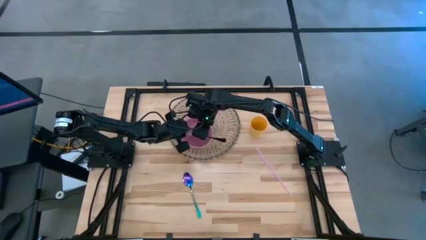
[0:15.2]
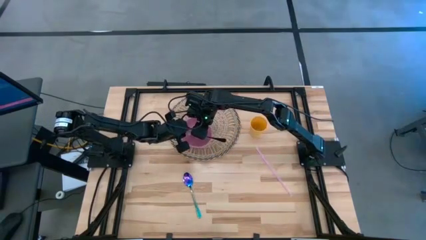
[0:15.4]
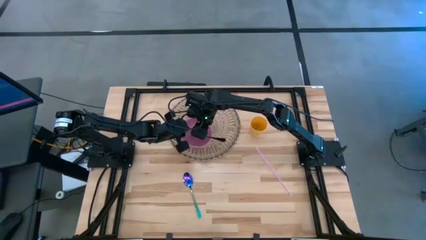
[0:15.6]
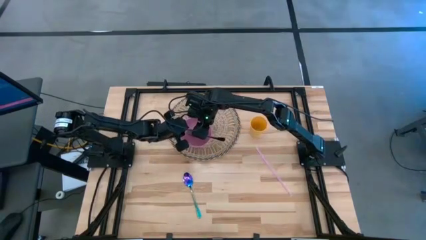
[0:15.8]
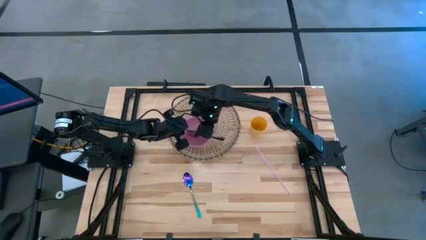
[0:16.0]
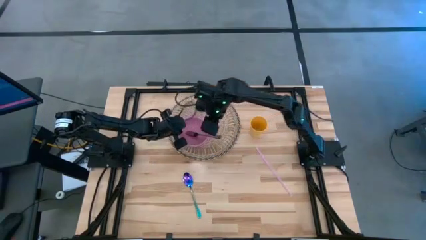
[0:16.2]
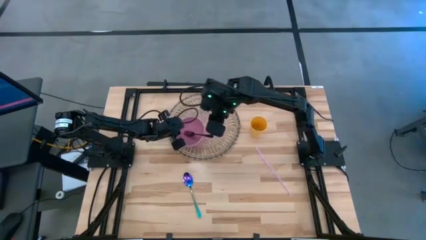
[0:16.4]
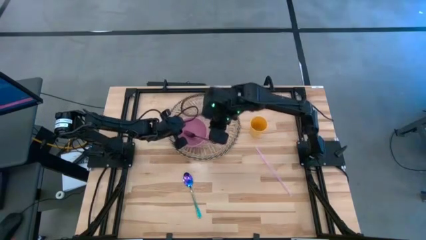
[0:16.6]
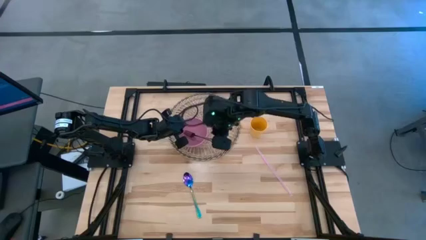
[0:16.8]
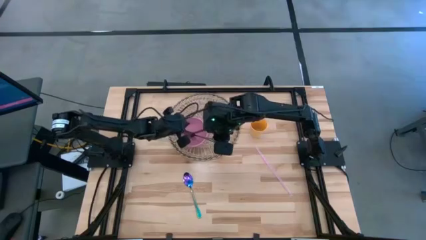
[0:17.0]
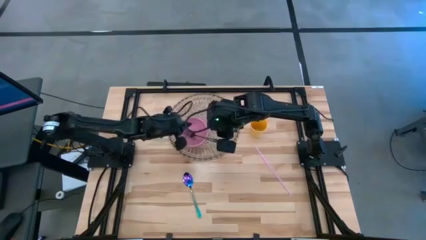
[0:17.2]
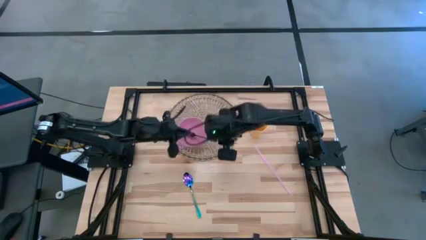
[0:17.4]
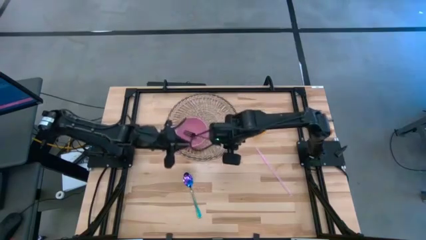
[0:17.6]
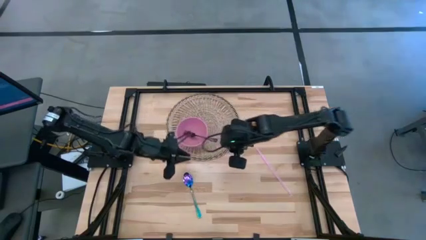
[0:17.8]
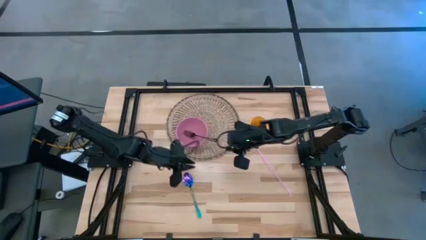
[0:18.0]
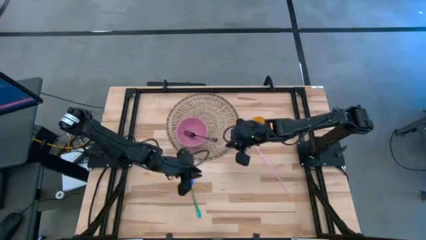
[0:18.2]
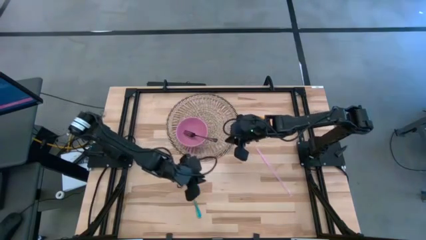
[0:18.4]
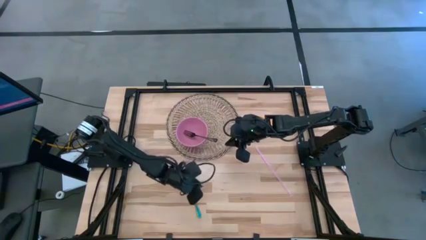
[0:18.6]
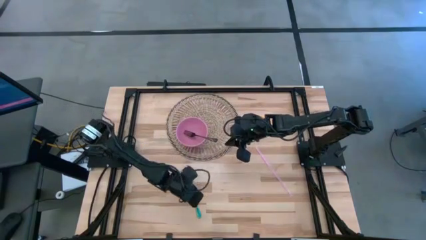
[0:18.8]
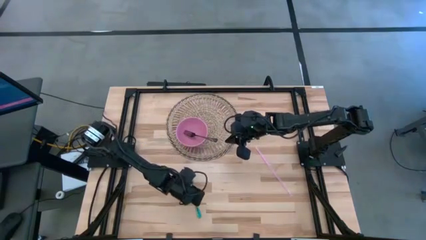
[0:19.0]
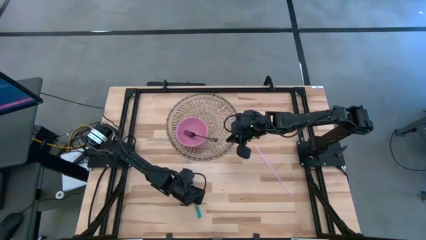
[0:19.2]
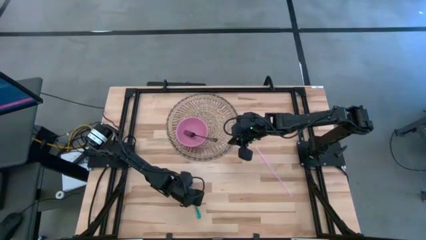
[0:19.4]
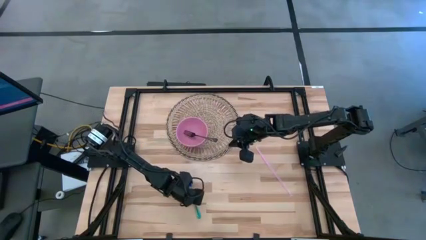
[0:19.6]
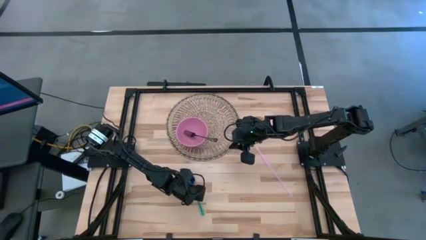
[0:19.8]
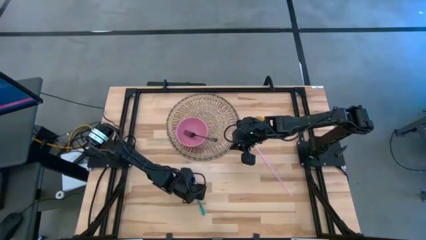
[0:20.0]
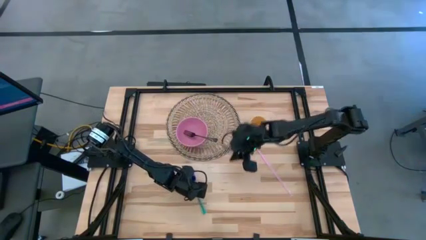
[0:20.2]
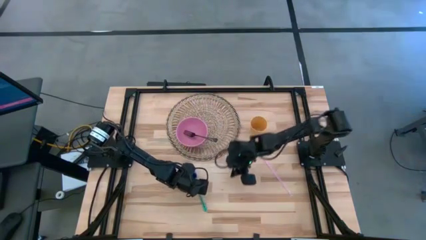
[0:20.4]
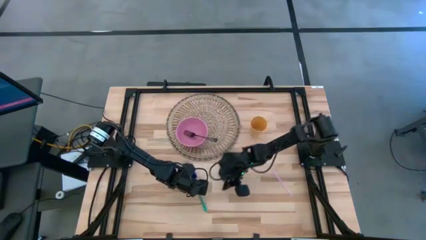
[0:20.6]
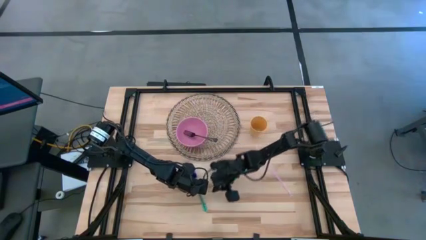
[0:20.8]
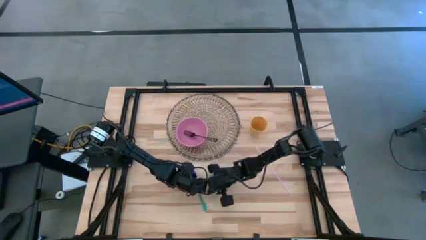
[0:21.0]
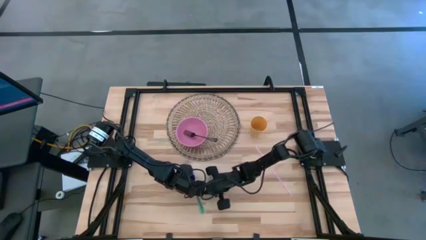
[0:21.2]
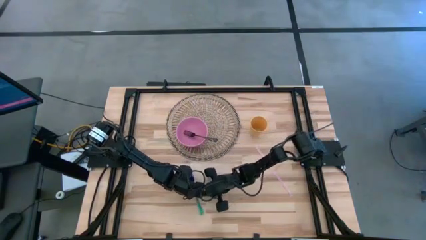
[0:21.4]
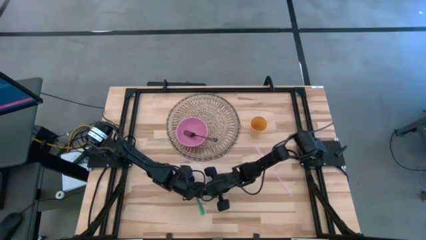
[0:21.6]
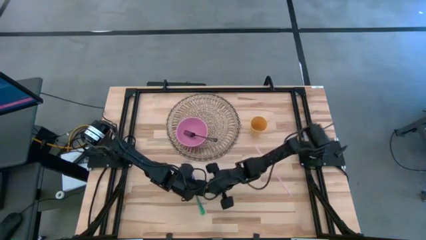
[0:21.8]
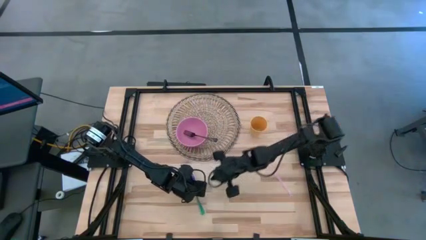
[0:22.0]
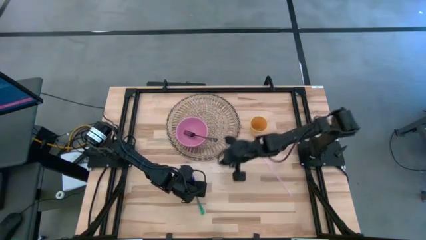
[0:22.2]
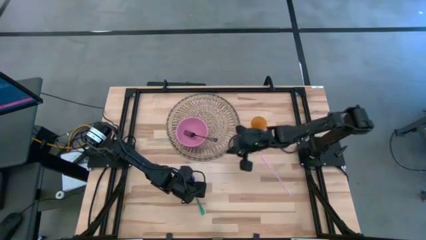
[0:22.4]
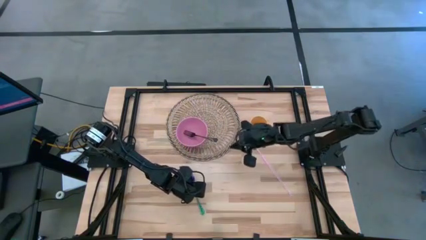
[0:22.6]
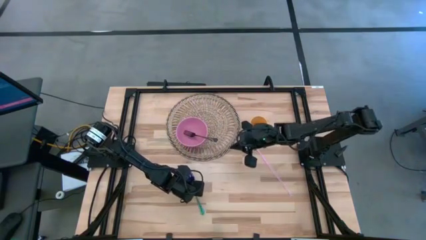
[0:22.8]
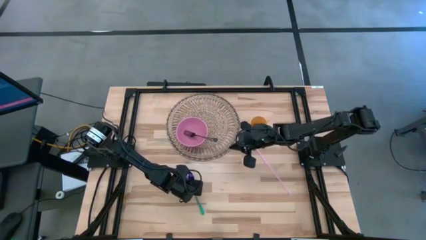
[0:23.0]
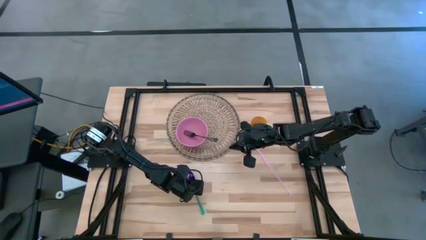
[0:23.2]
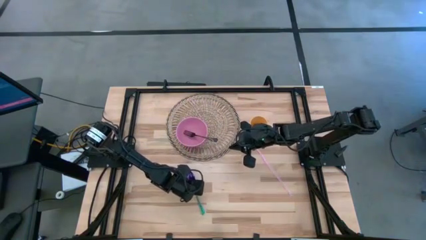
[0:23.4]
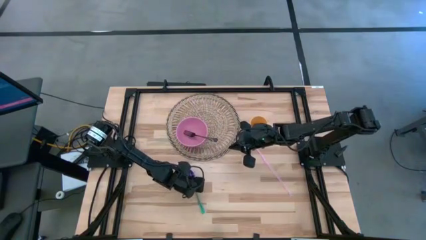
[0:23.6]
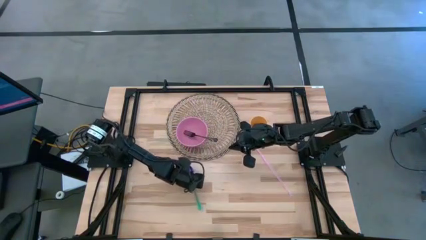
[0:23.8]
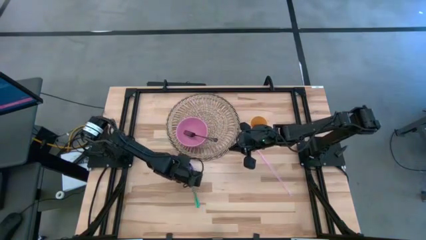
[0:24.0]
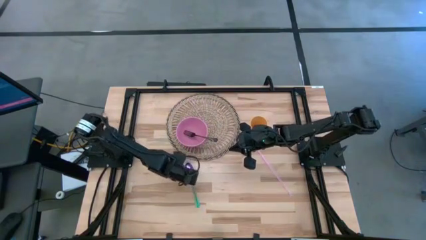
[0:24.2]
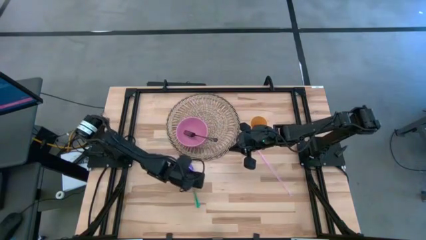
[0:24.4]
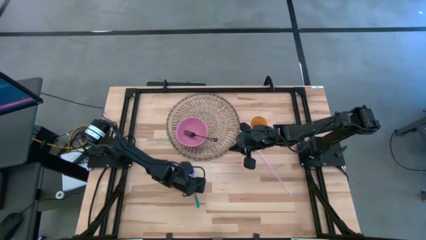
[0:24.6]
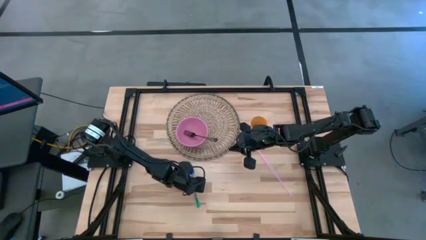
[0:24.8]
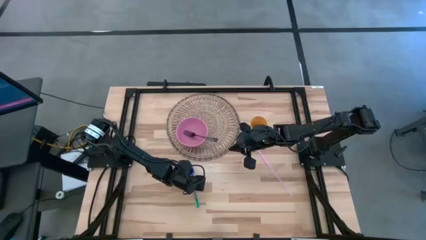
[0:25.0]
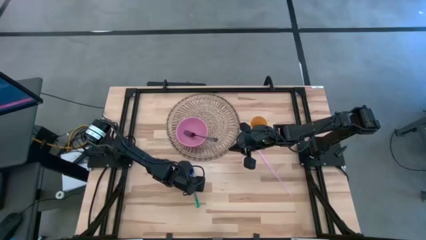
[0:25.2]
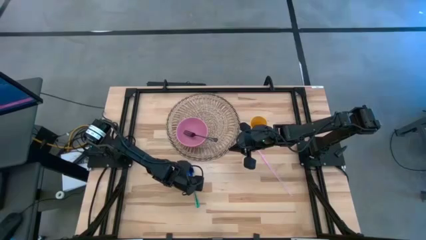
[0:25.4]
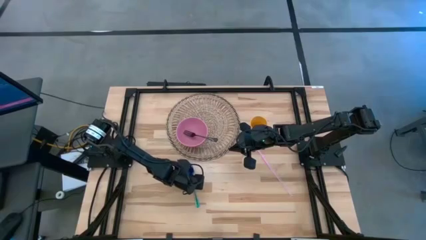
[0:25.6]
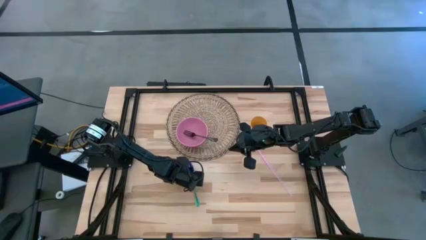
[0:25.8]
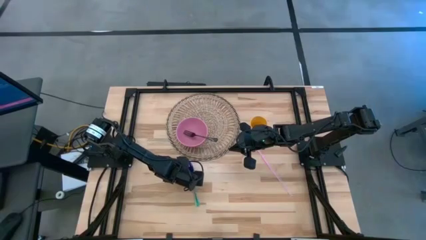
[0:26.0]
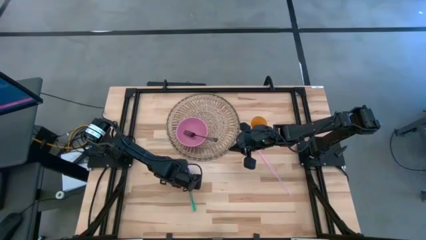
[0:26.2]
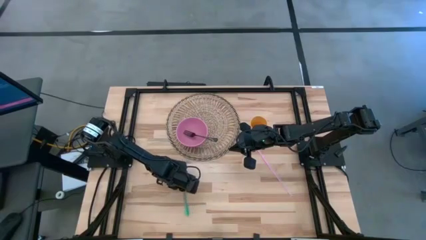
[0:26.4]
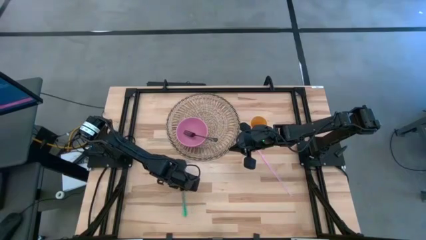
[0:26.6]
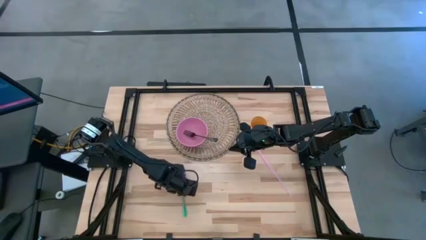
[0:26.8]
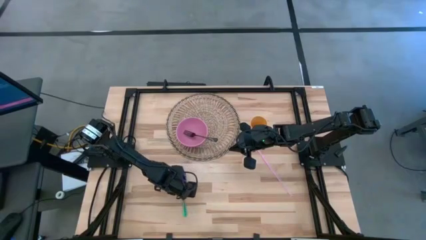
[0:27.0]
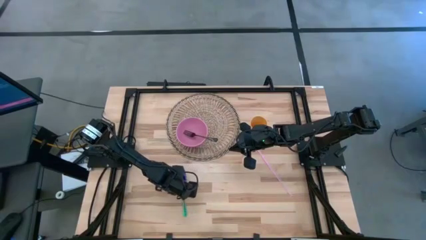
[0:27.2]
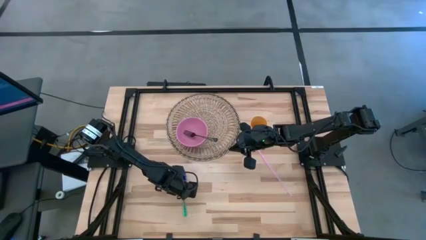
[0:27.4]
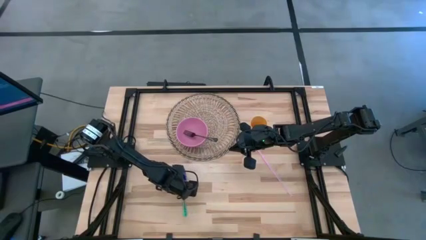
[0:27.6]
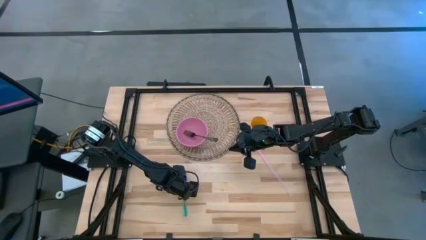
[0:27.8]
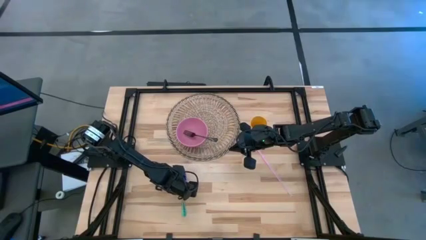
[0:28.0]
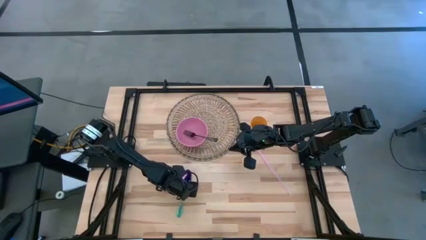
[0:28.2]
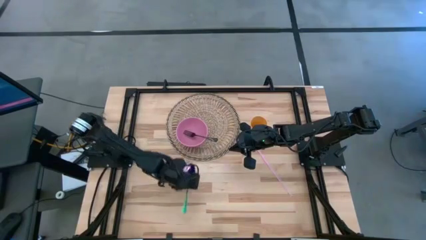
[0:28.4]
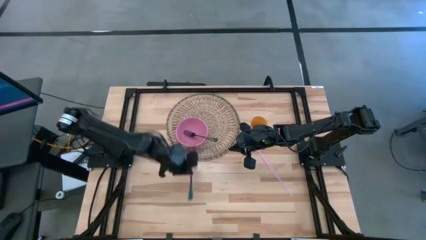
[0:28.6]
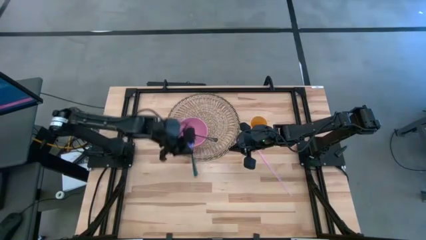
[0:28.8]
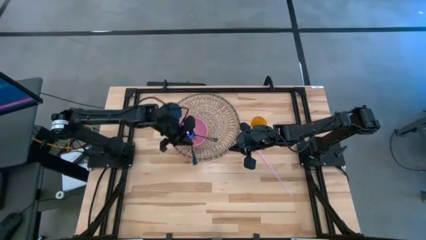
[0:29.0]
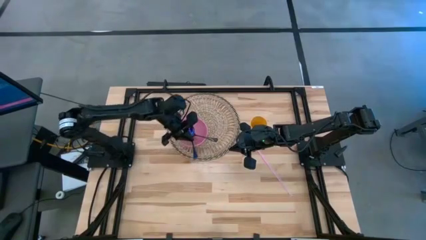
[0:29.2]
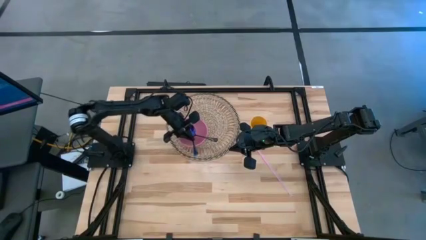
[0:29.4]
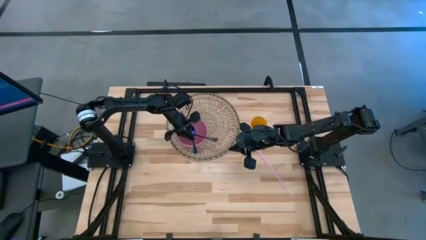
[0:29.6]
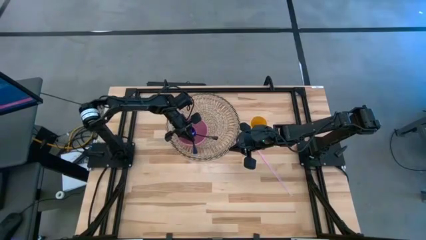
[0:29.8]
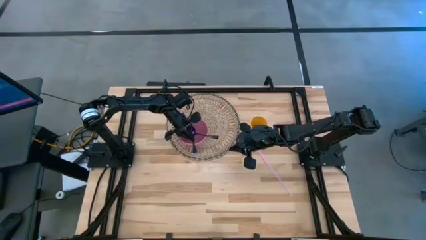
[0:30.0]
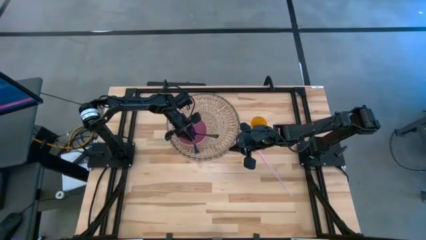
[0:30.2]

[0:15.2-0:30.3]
Task: Pick & Place Utensil
Put the blue spoon on the pink bowl
